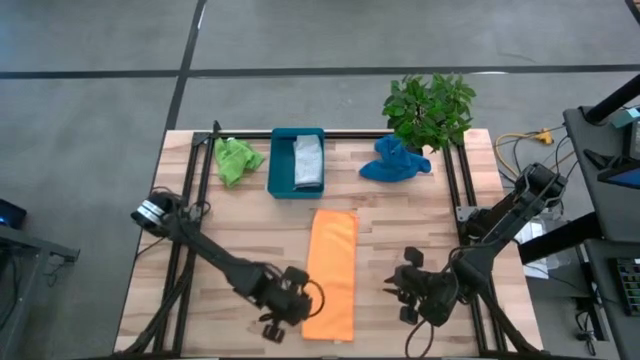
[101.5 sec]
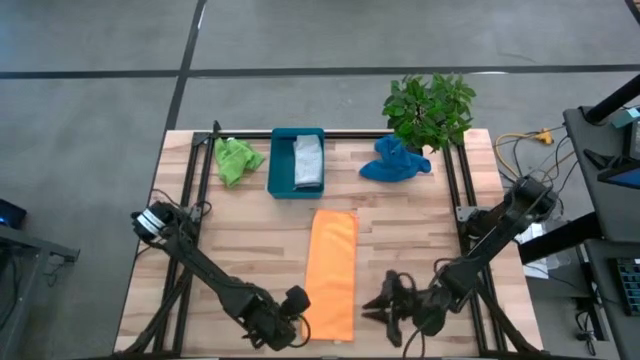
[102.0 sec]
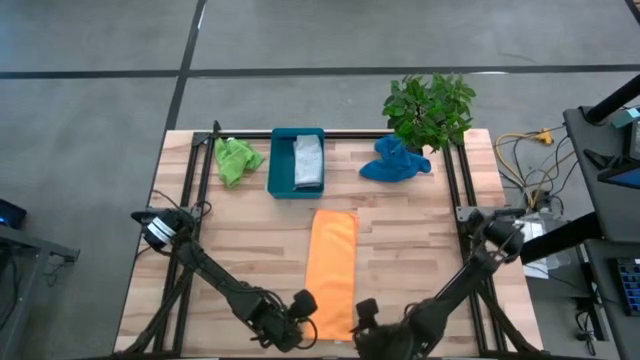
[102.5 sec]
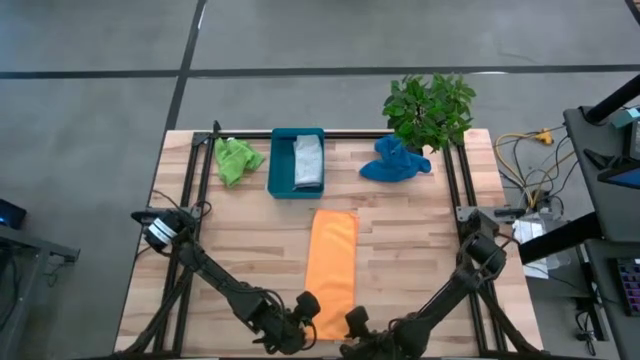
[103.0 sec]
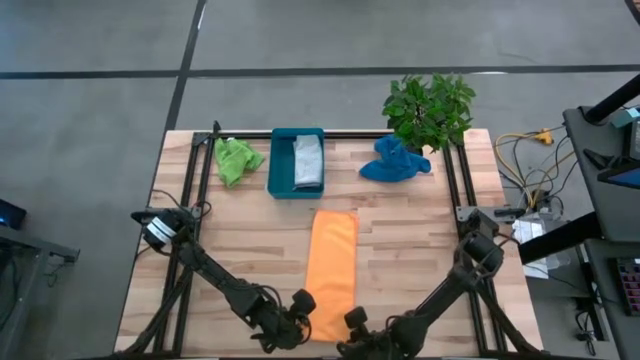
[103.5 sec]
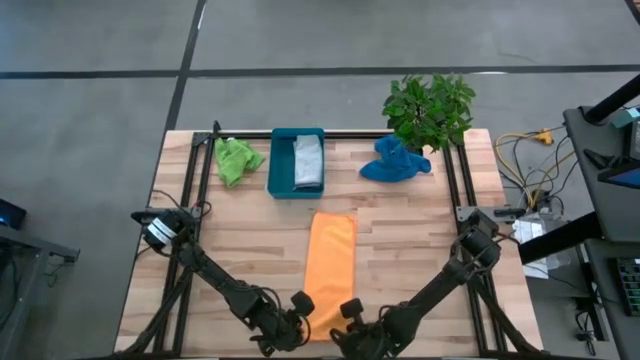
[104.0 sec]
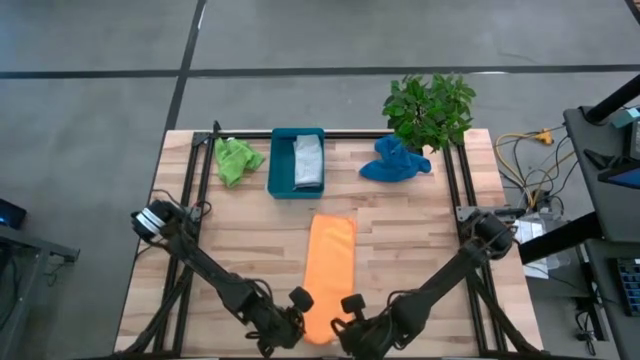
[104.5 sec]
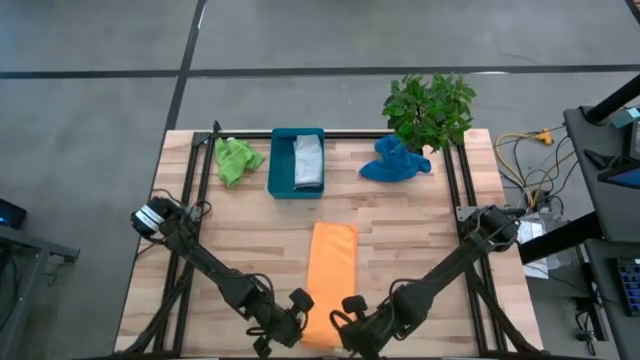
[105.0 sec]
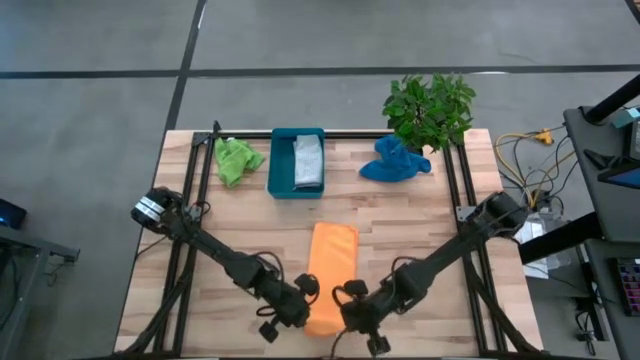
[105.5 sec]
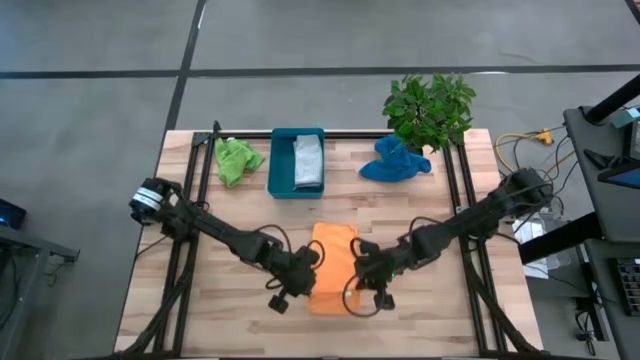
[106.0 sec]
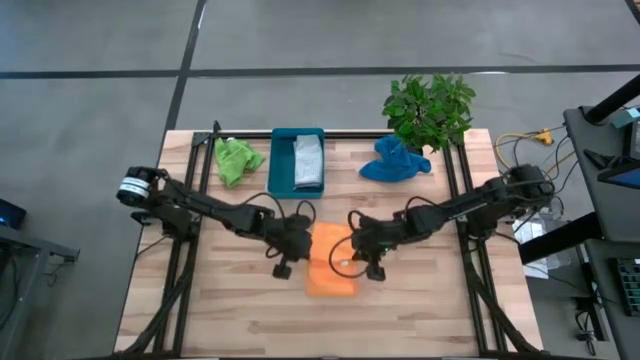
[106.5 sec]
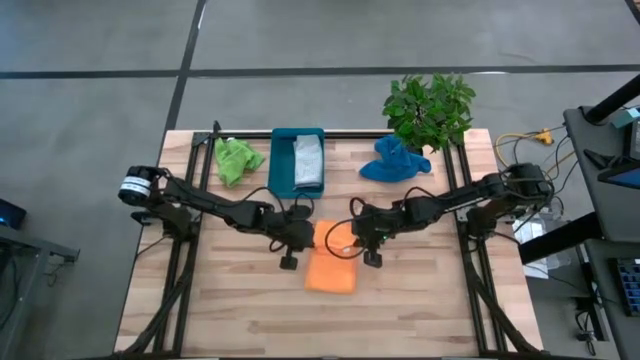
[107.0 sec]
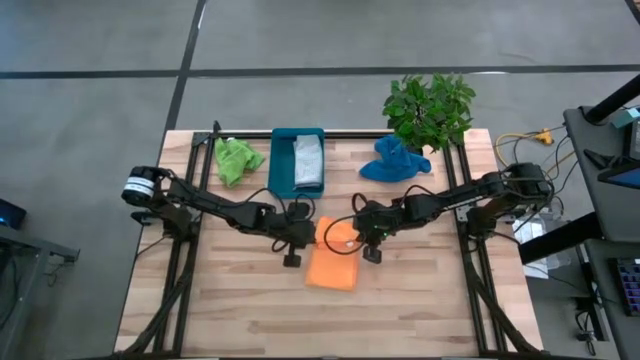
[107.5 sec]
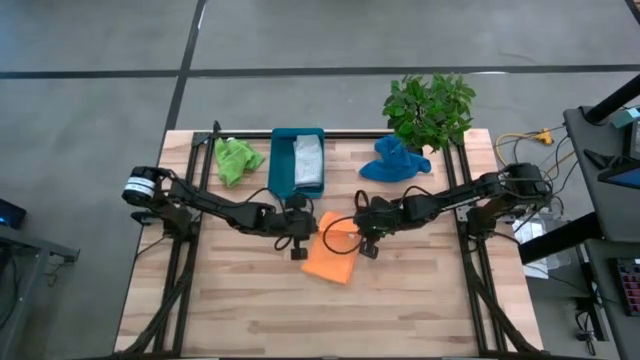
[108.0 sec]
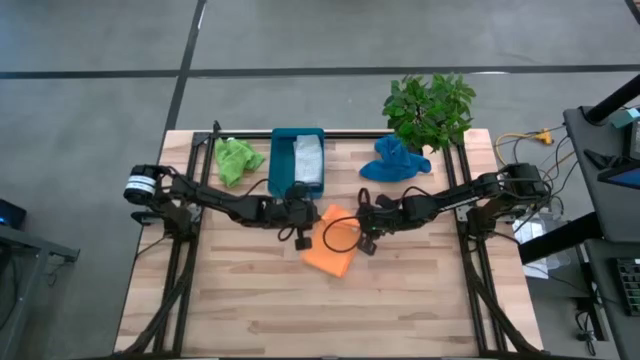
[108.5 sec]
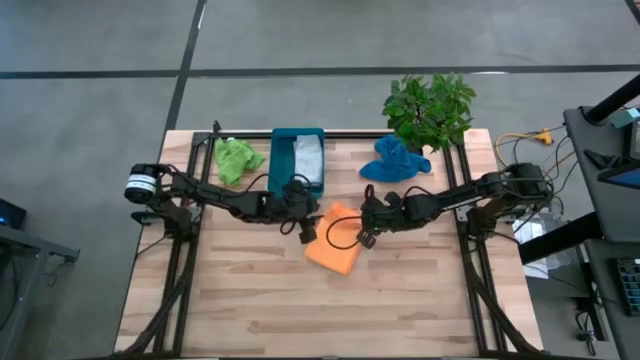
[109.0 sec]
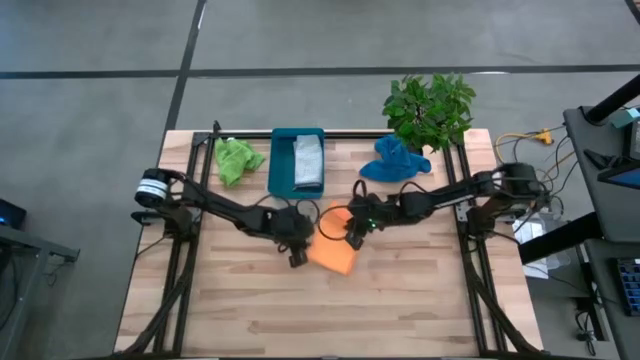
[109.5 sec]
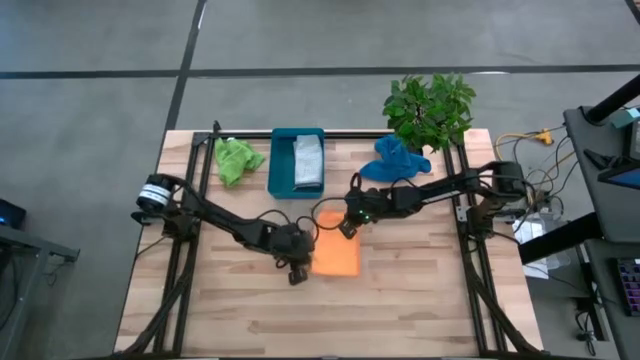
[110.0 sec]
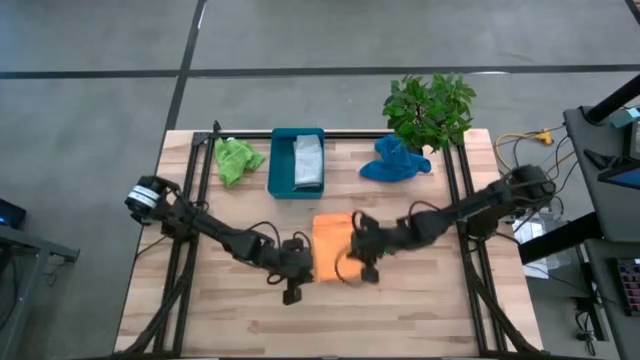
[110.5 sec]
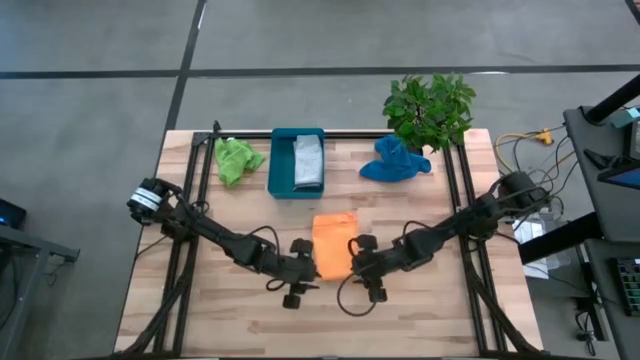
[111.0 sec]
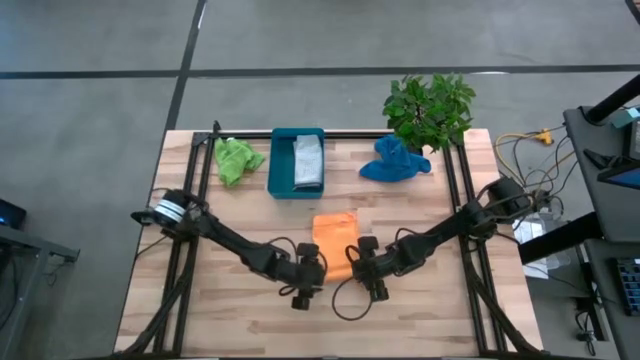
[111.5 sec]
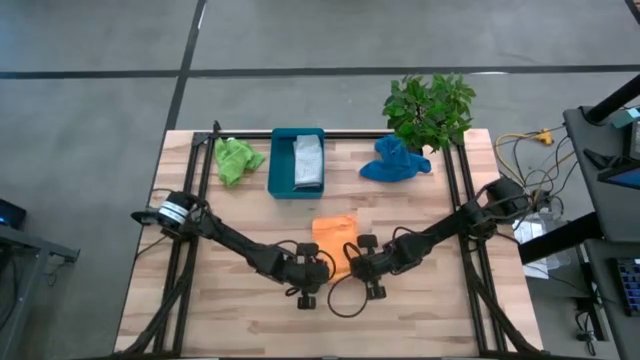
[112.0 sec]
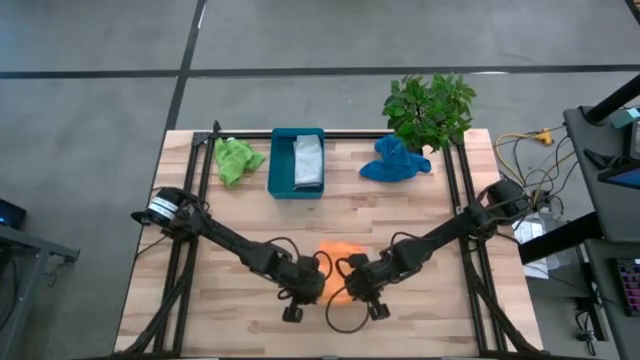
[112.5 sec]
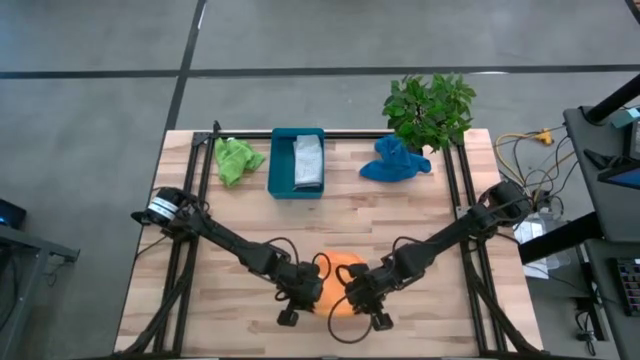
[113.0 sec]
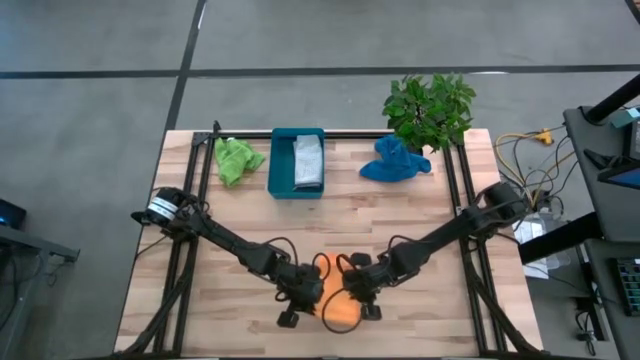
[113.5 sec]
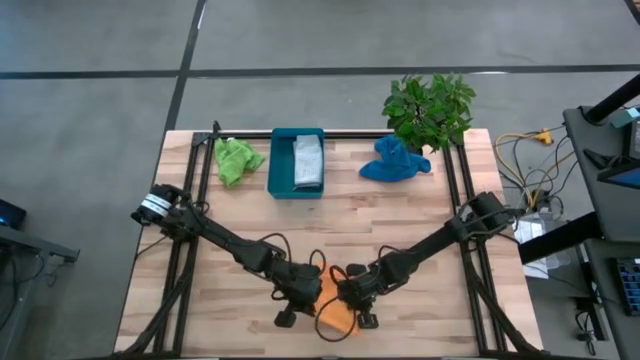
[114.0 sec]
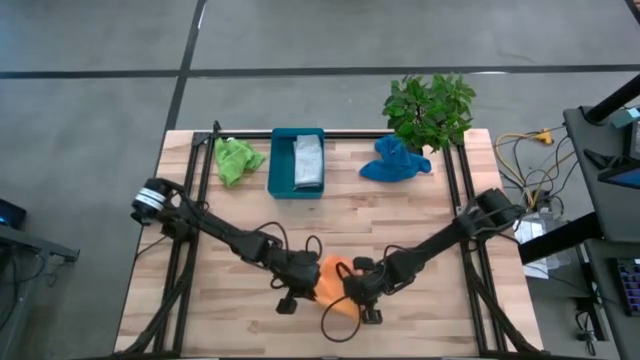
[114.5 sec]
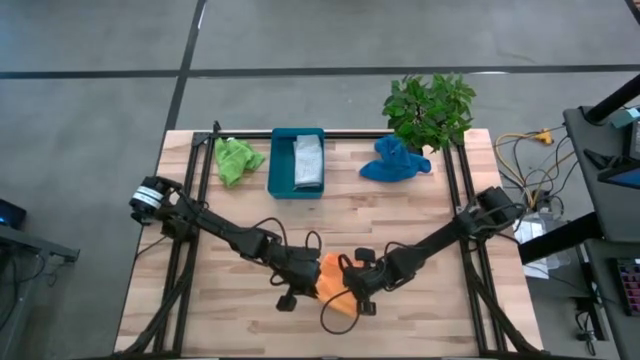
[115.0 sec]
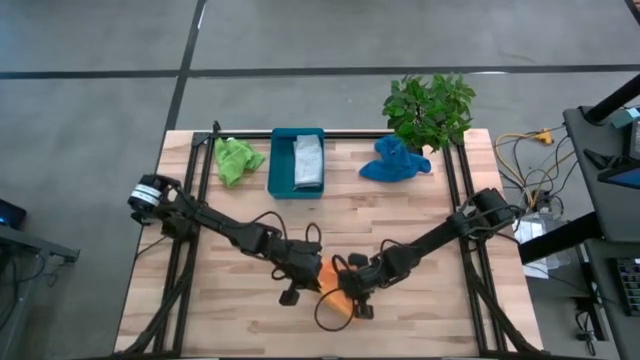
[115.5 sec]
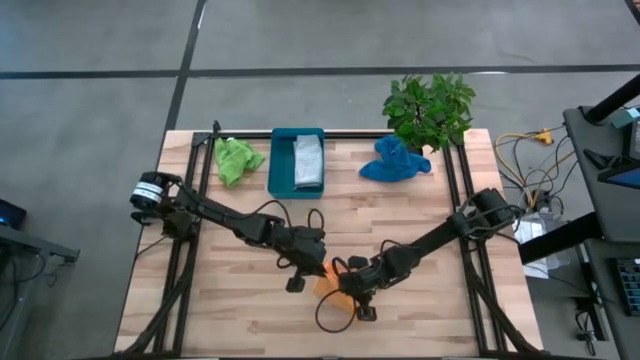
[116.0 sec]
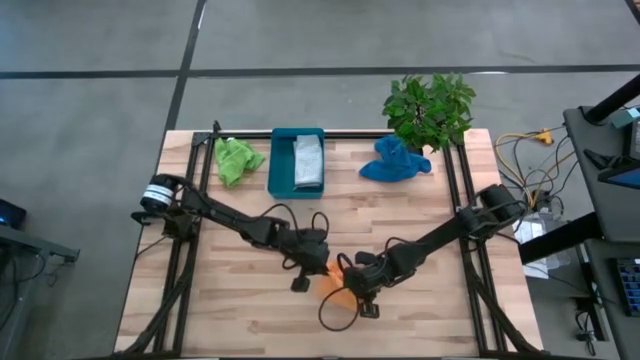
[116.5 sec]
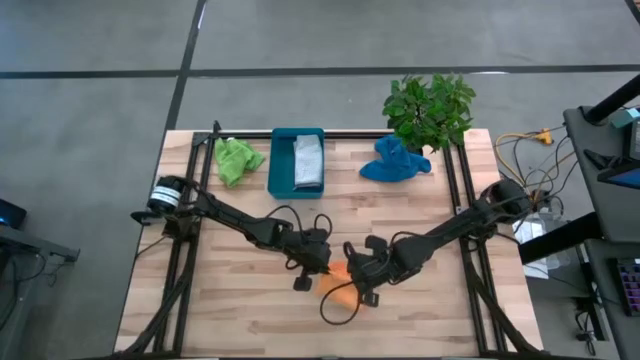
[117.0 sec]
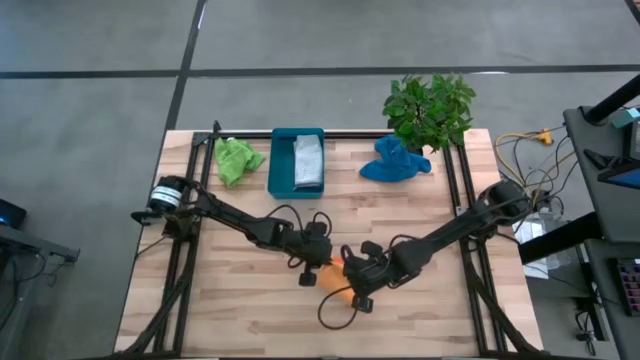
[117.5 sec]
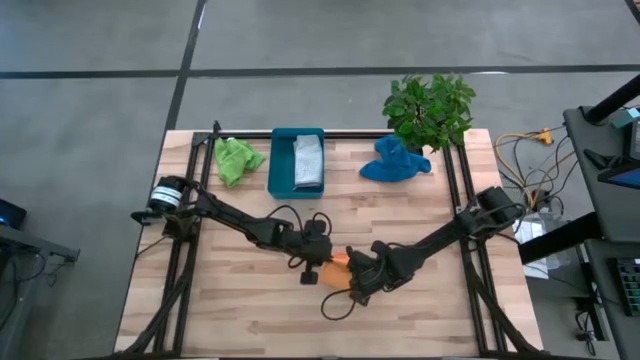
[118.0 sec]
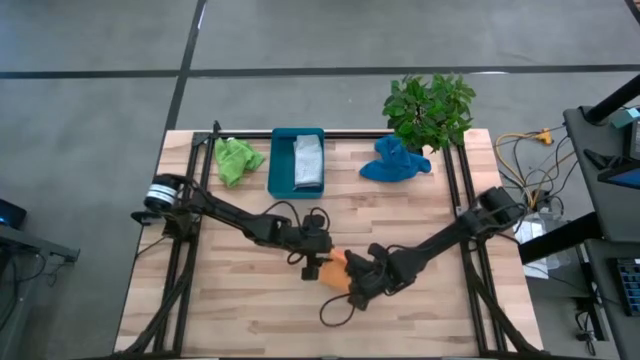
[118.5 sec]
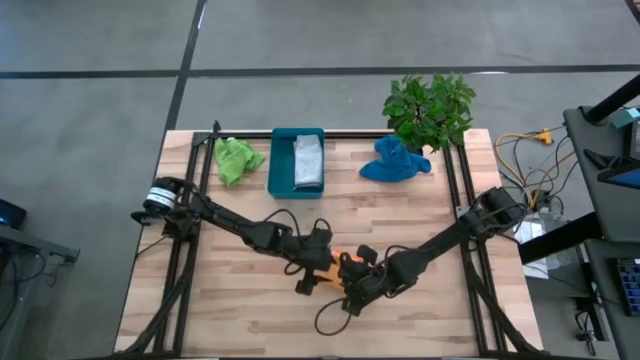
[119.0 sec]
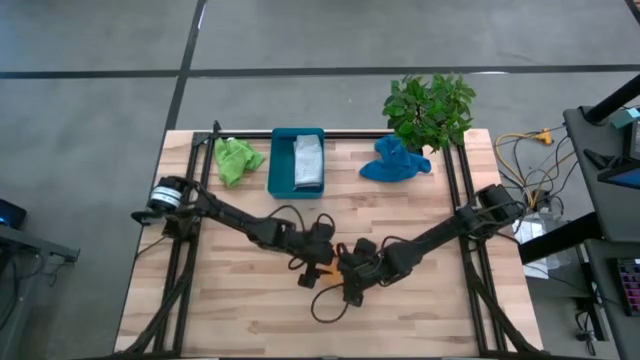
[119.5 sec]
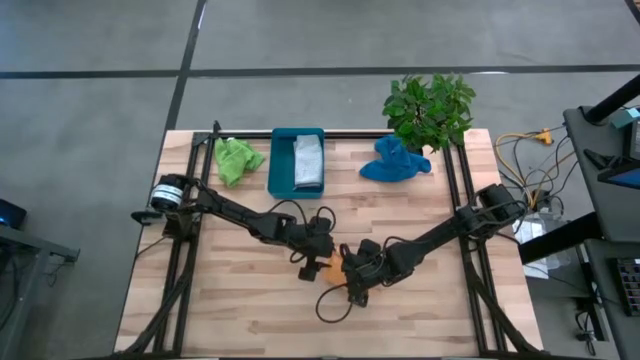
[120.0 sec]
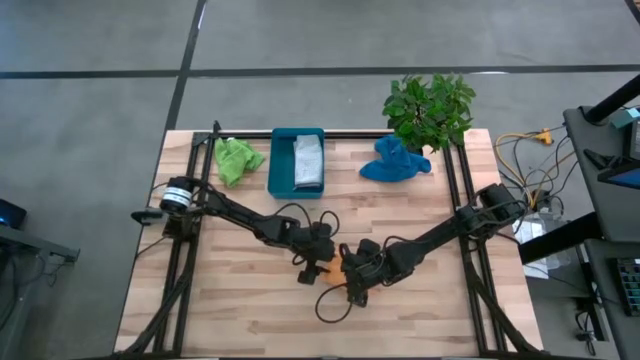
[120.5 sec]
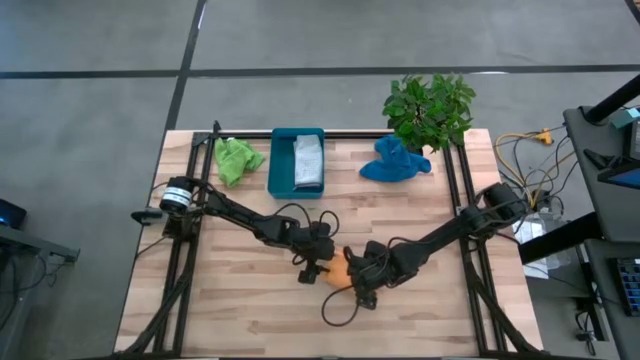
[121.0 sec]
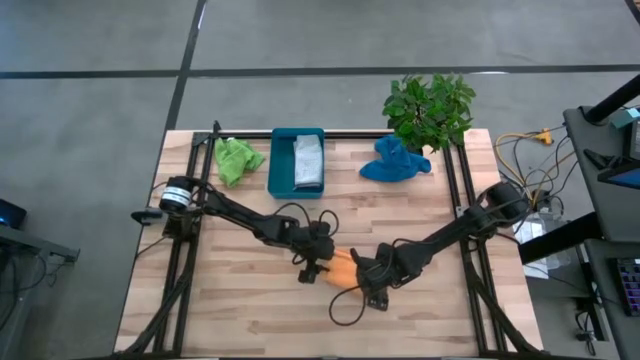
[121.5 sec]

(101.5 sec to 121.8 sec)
Task: Fold microfiber towels
Fold the orange microfiber cloth

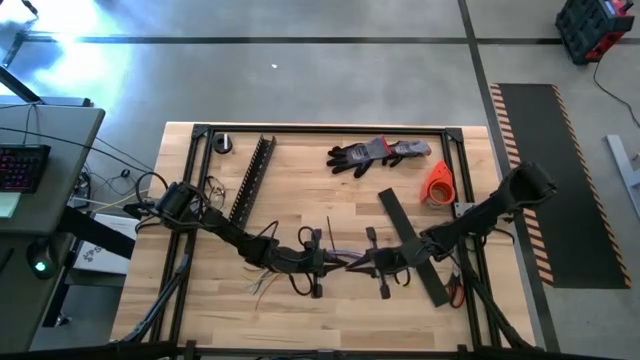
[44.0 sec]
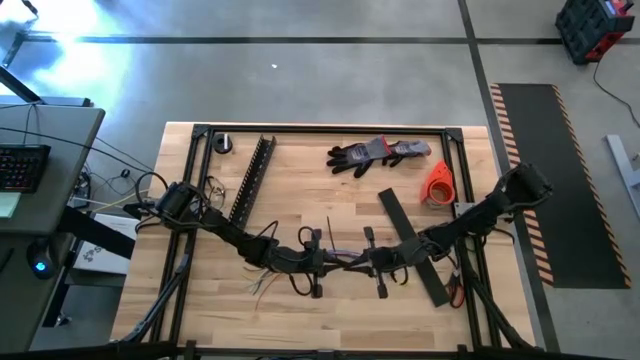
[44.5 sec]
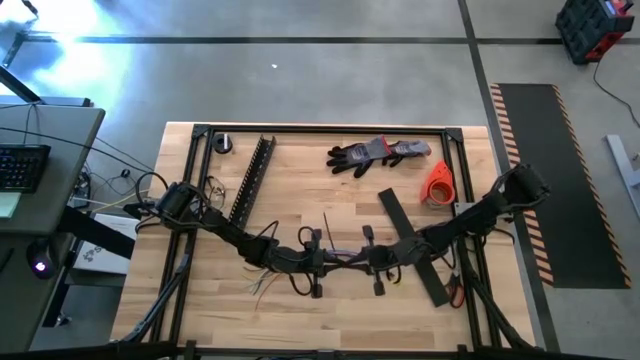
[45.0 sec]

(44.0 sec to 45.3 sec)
Task: Ziptie cables
Wrap the cables wires with the black zip tie
